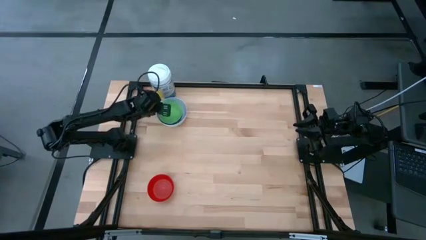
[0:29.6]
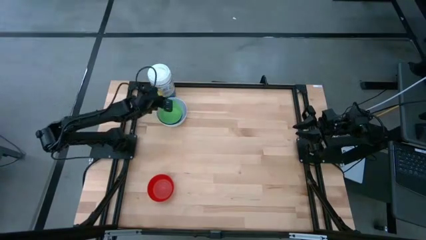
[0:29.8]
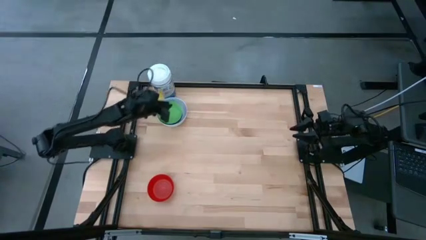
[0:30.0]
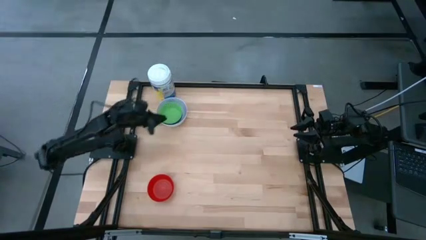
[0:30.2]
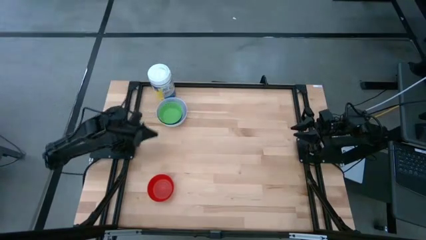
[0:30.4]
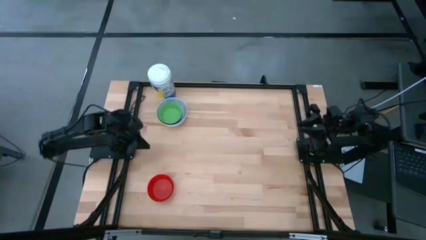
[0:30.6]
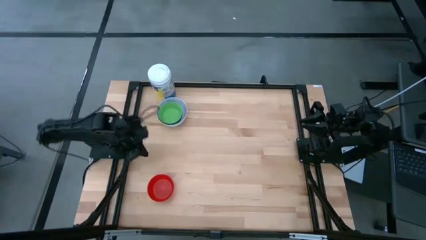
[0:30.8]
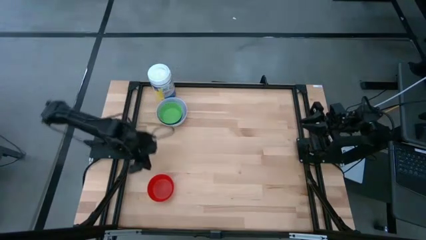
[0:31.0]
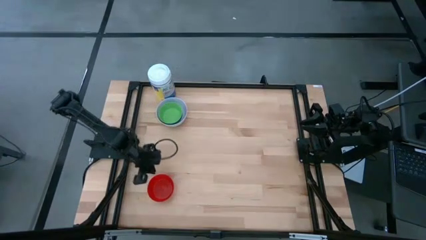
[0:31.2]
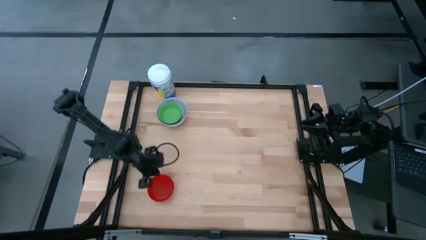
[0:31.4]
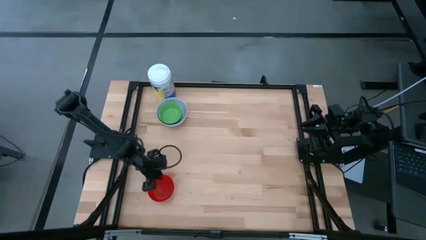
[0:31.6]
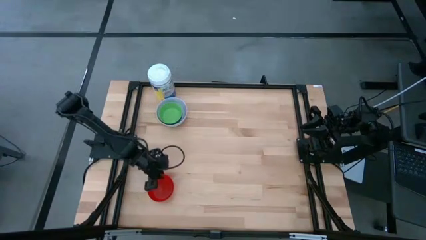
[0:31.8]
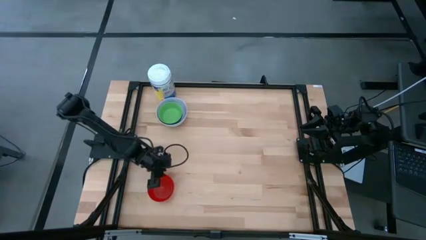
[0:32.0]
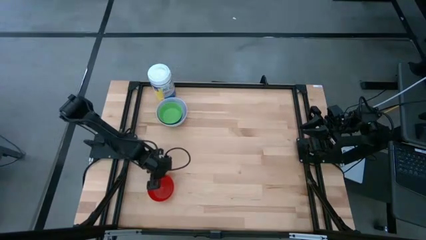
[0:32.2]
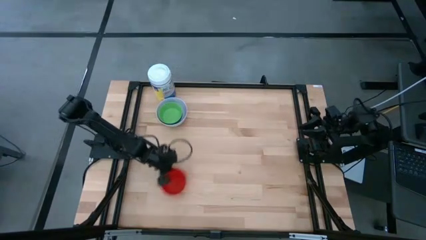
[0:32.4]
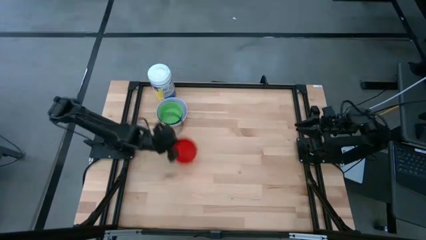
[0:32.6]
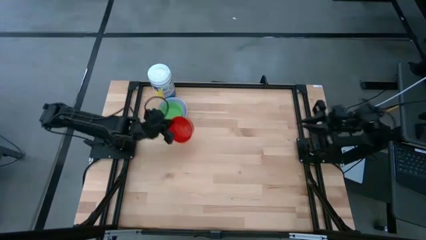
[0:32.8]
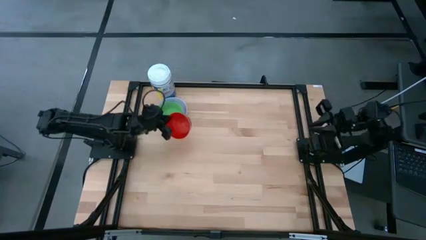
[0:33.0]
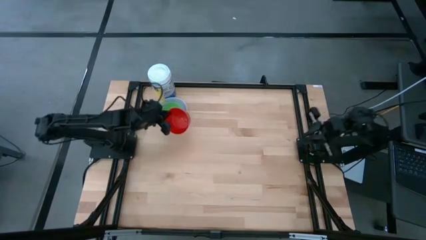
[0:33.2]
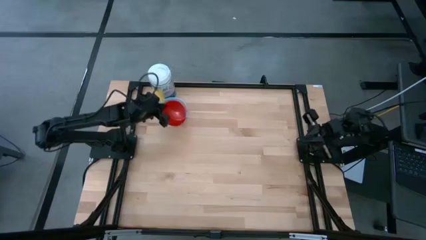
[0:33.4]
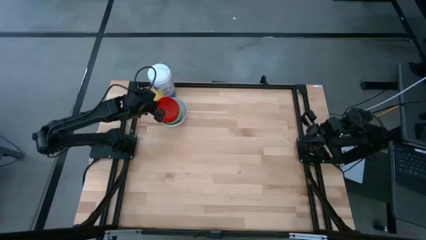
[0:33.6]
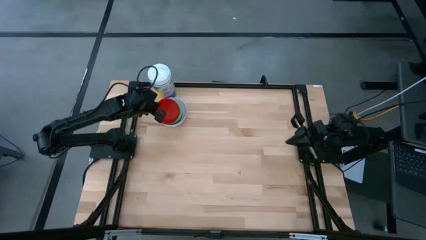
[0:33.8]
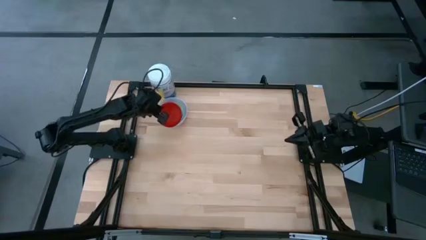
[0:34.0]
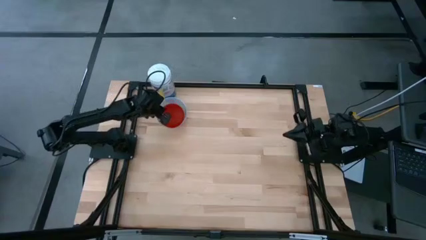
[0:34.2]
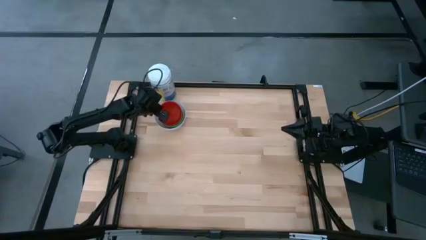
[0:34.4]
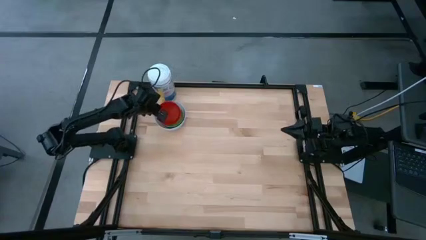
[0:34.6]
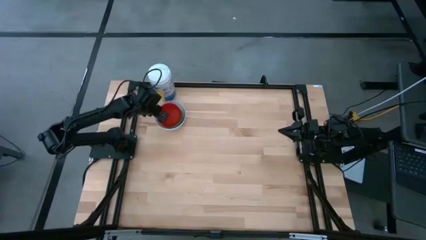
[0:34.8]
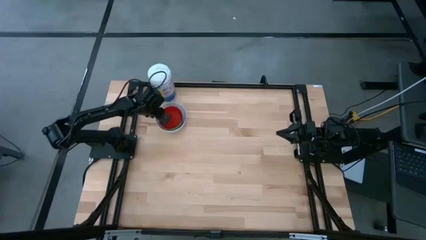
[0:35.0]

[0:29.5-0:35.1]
Stack the red bowl on top of the green bowl

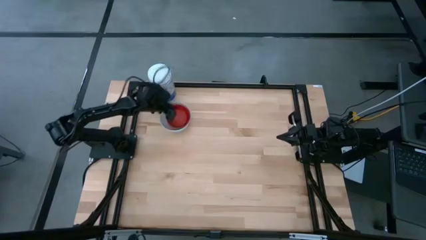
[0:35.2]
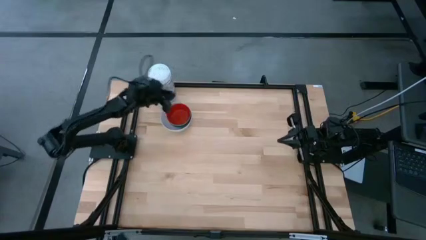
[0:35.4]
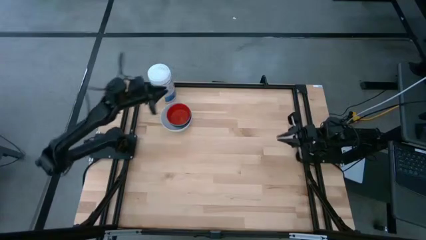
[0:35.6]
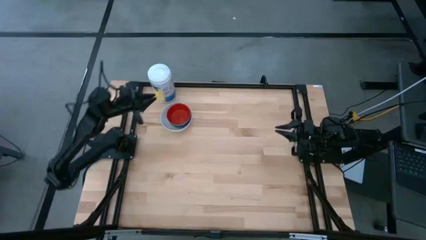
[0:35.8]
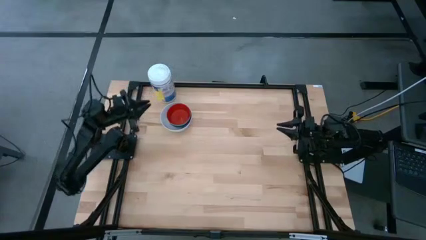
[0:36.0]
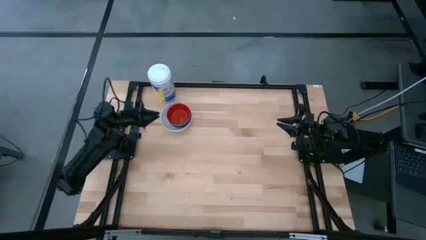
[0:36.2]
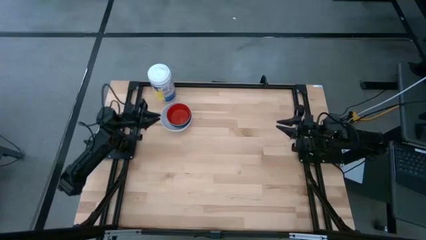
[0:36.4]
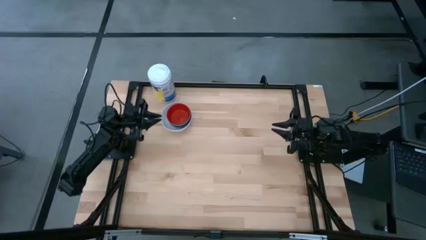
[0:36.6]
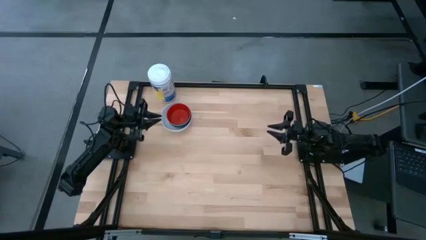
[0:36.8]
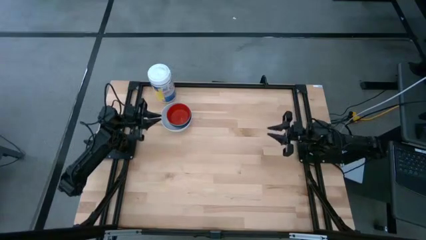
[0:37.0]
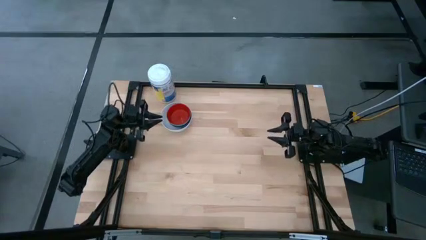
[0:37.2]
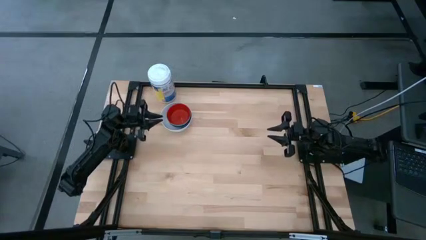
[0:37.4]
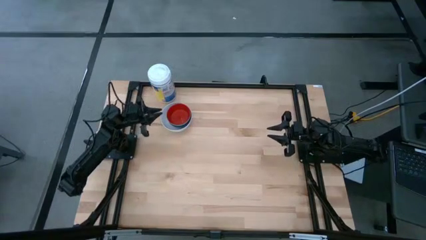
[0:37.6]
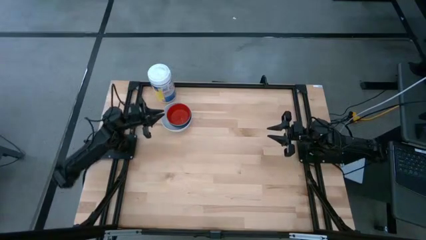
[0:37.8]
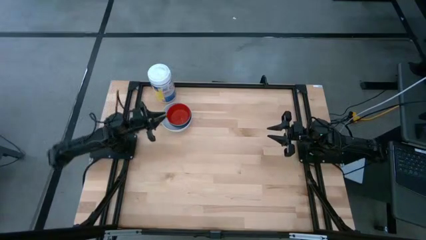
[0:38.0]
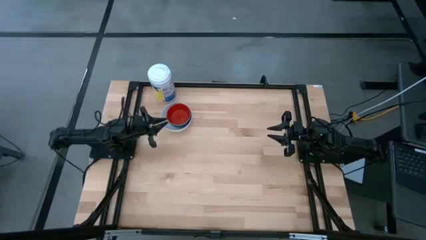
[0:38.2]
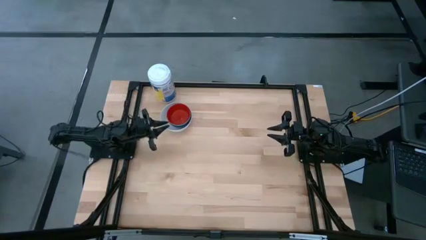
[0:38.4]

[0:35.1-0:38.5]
Return to Home Position
